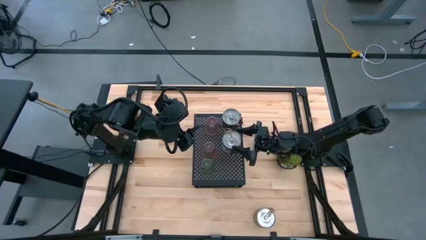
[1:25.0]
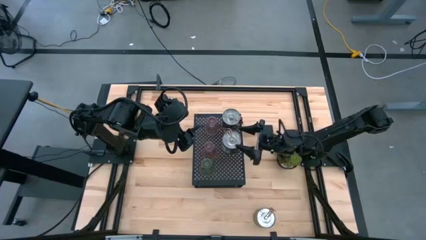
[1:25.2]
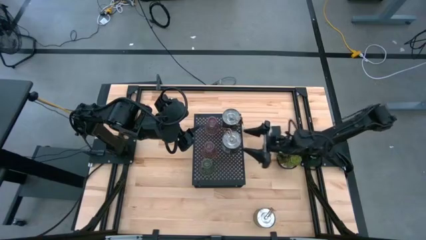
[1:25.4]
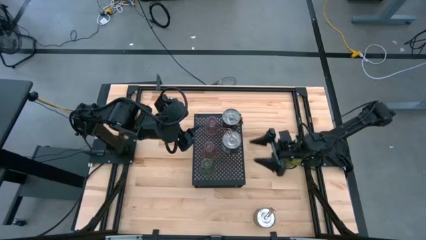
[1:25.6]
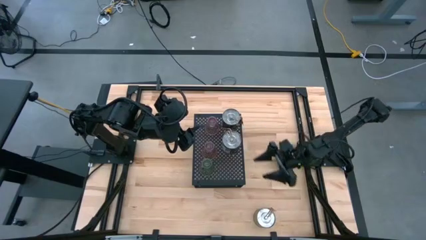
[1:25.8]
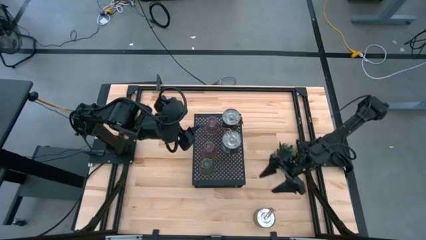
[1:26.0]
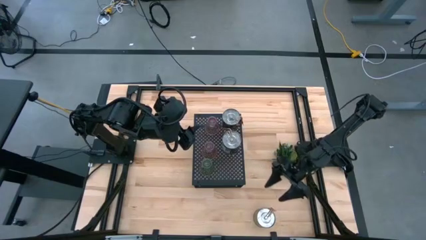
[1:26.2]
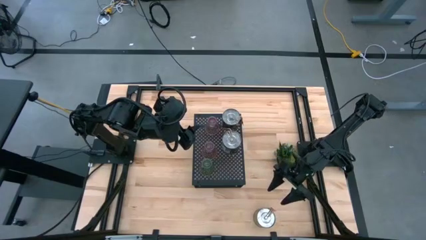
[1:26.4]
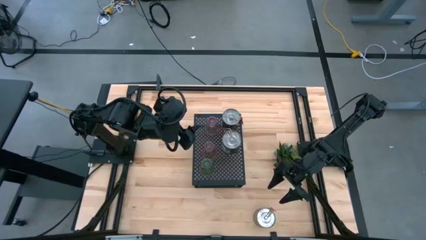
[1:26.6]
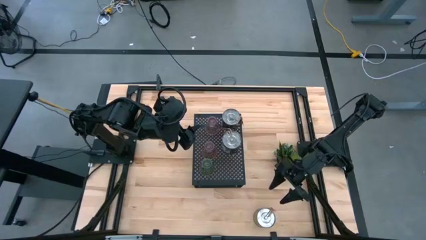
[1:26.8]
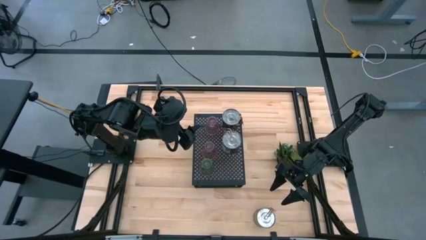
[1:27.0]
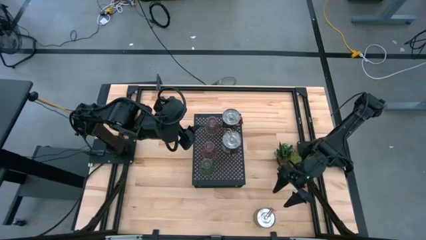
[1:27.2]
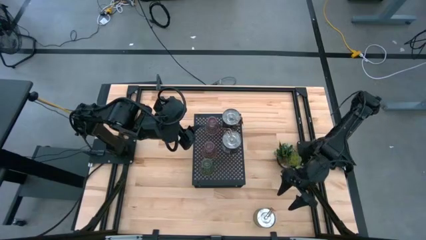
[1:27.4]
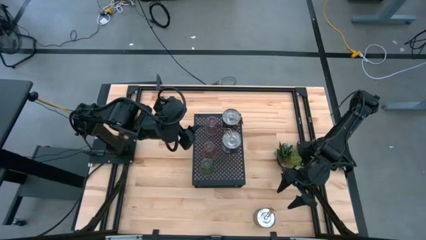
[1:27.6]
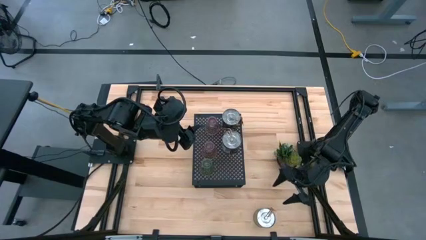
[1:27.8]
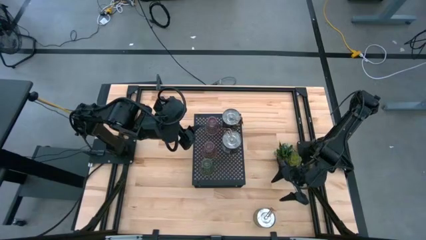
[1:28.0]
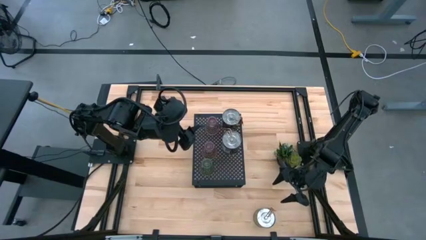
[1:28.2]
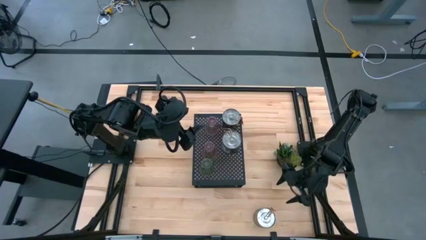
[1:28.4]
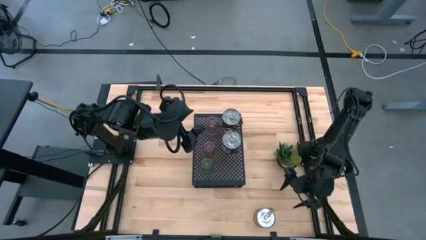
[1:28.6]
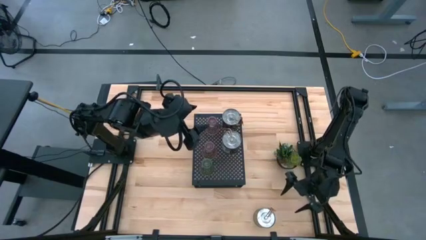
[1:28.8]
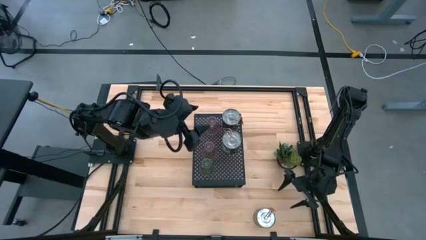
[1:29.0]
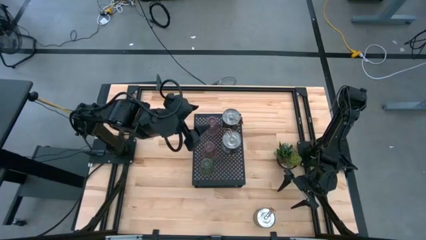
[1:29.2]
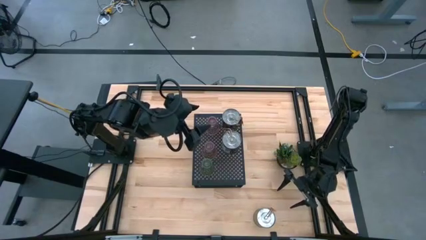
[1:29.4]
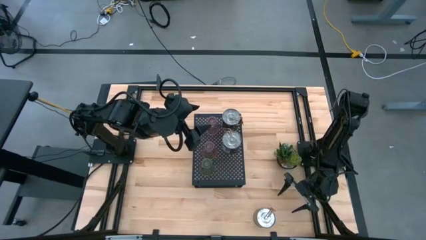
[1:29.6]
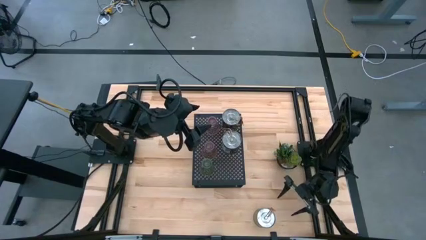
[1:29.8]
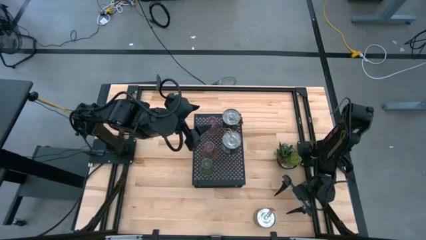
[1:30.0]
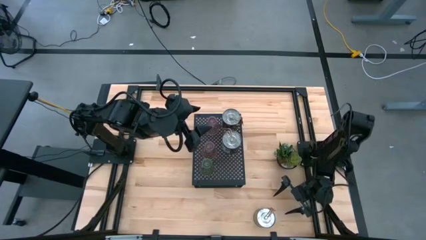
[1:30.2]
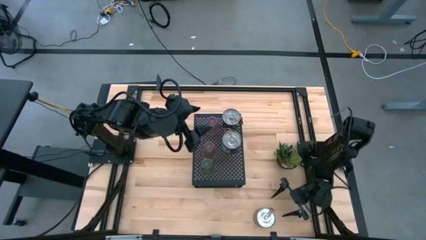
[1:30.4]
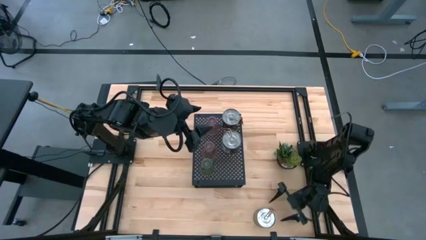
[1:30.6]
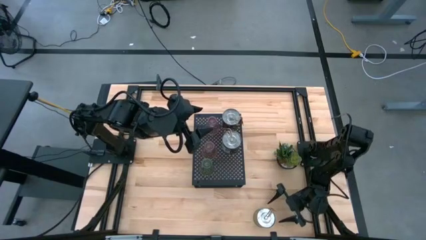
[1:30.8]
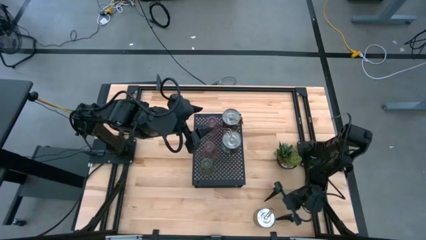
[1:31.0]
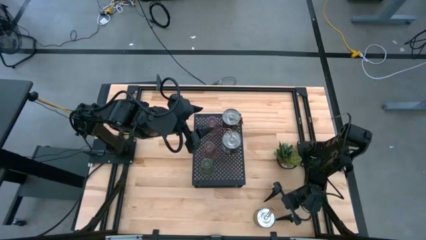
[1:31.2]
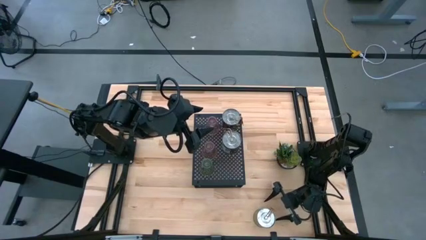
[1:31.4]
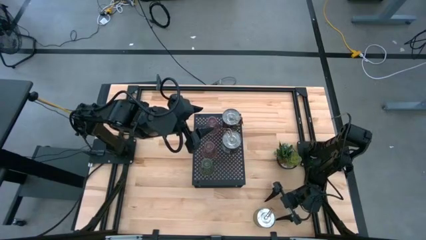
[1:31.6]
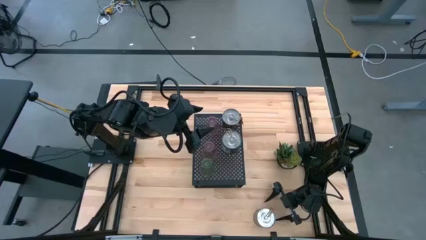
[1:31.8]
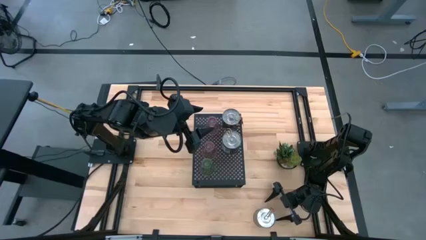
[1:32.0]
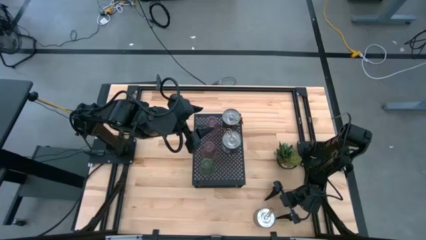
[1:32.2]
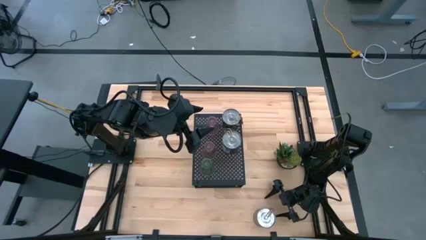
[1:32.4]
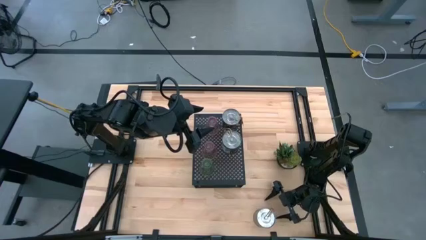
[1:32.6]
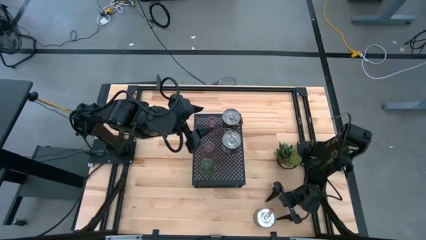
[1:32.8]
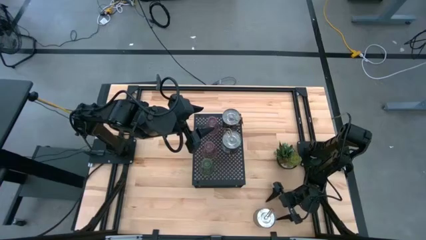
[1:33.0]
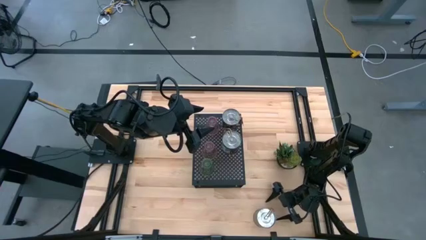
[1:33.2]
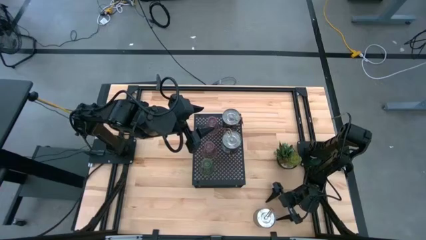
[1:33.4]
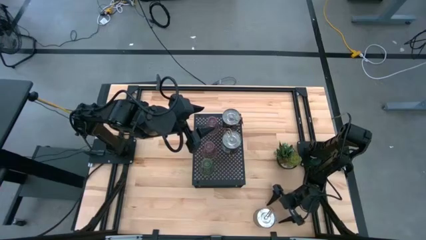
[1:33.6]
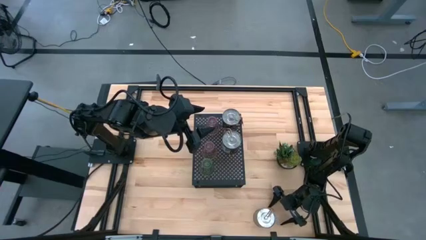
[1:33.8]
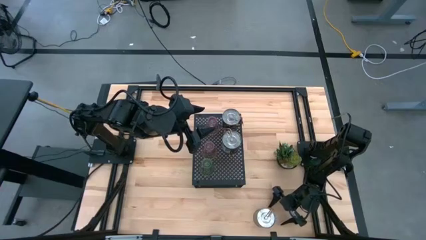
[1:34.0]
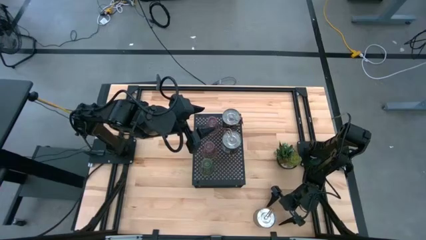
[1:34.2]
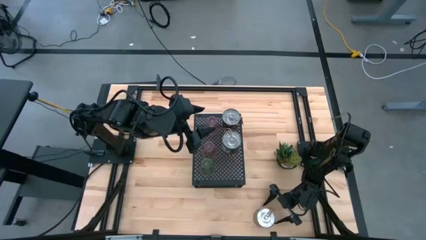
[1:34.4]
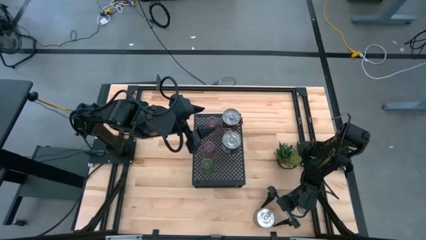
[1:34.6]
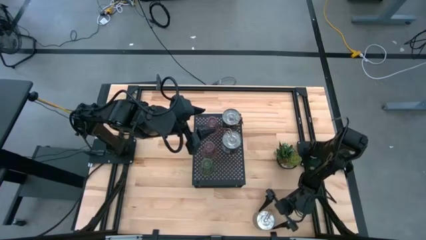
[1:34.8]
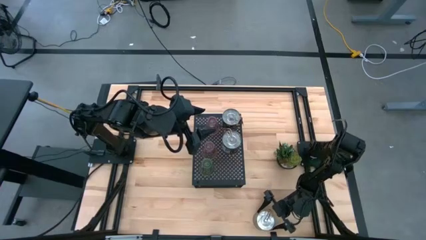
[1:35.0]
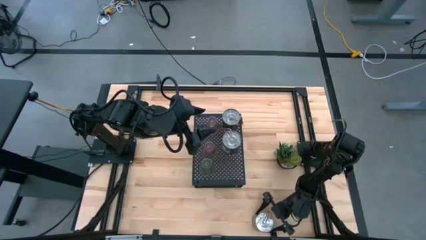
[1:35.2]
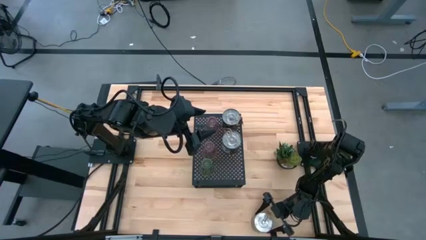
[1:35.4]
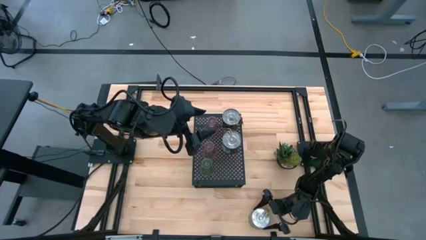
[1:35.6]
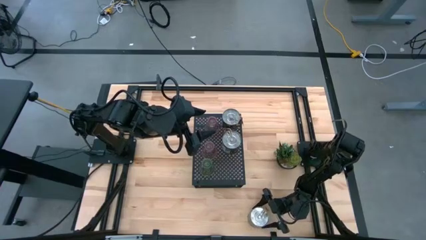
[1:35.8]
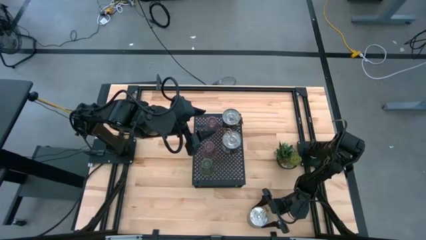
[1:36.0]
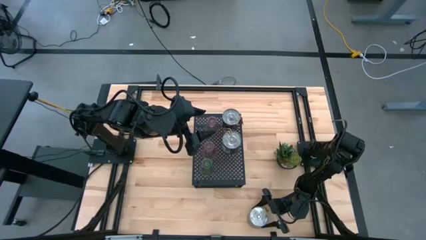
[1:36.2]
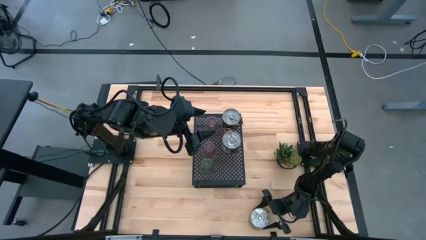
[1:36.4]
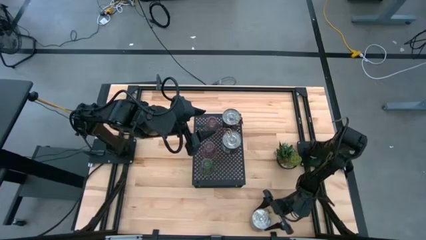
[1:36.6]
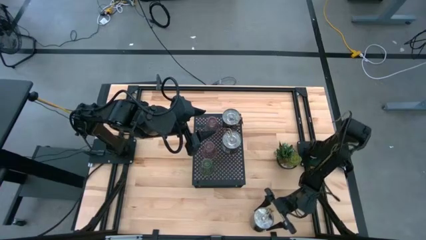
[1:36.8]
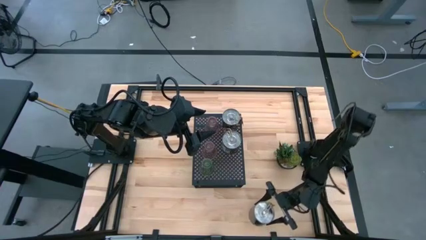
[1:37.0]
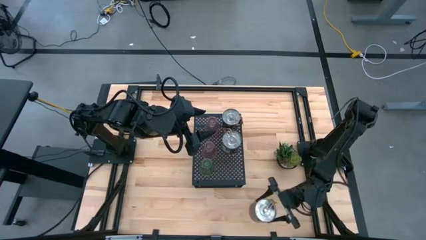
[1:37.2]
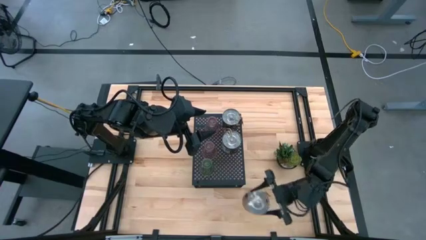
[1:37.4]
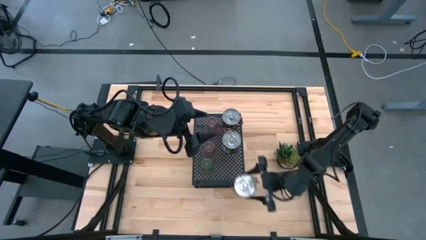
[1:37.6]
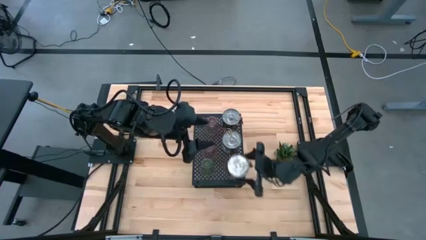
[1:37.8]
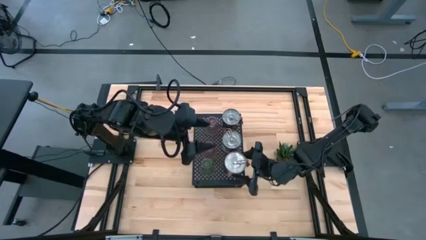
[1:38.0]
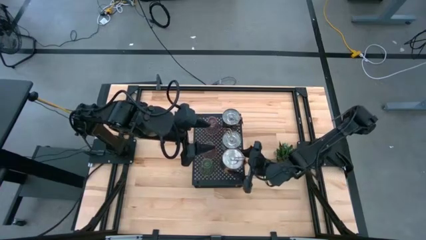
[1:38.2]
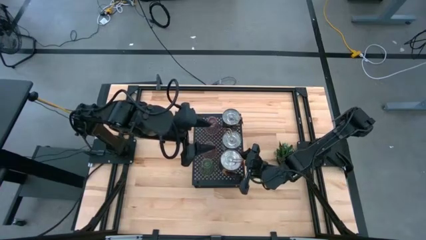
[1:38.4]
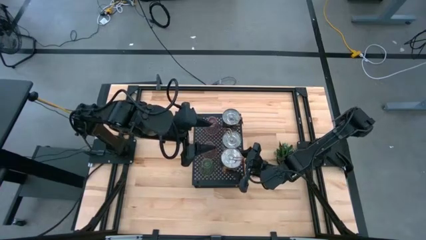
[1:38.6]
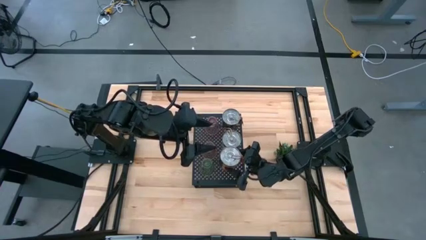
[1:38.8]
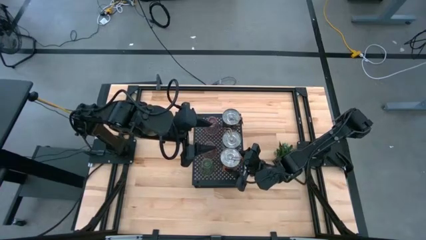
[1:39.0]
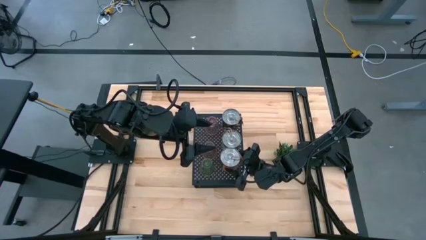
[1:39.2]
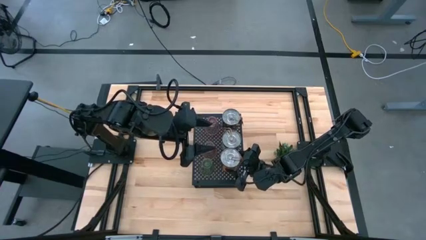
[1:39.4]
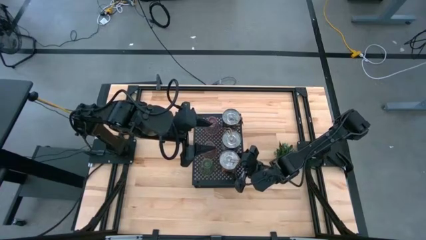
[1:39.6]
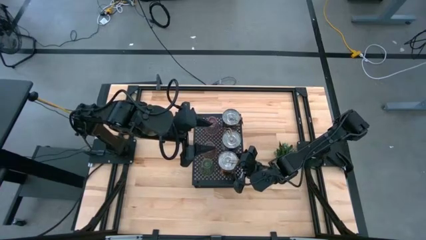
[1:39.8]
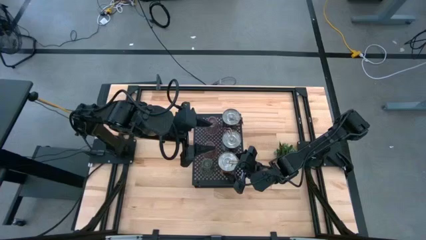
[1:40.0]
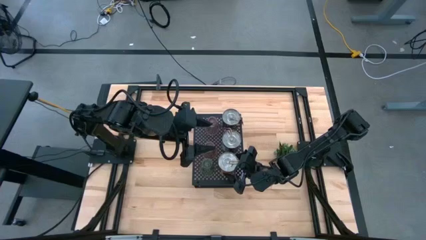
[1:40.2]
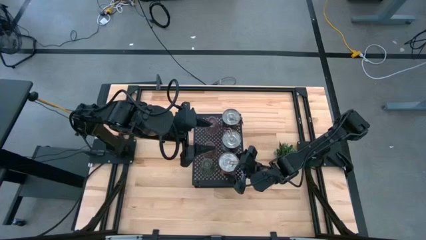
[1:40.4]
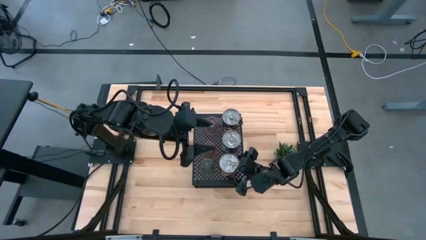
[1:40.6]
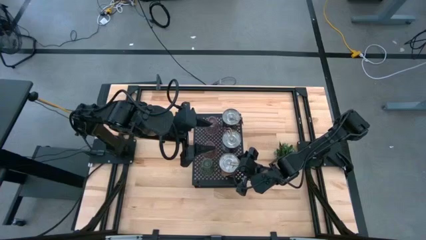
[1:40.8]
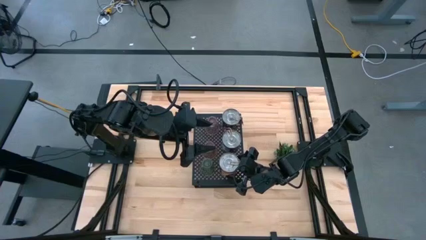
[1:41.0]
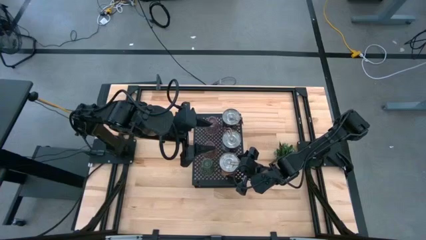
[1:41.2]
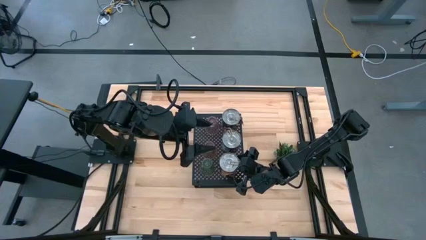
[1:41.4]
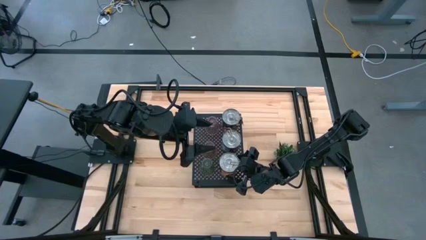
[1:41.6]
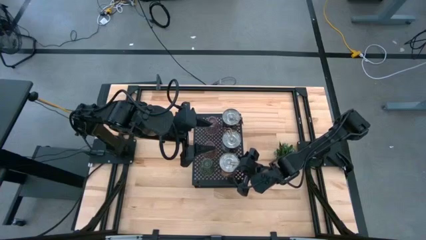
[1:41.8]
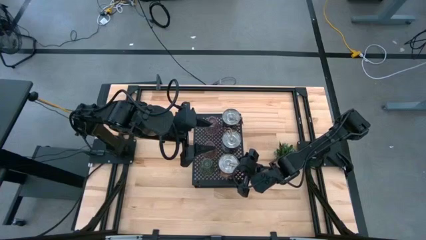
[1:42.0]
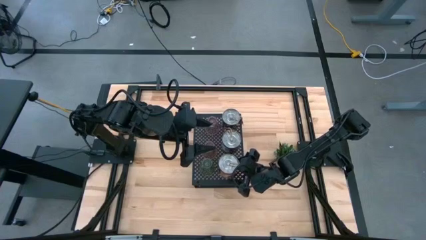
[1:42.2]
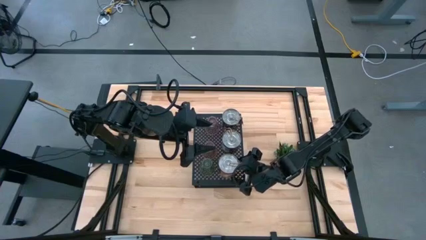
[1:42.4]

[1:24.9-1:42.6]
Task: Pick & Place candle stick holders
Put the orange scented candle on the shelf
